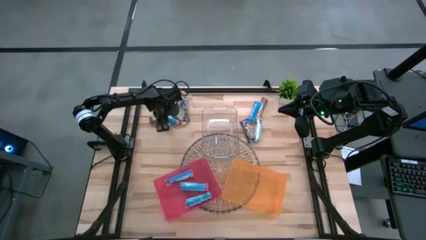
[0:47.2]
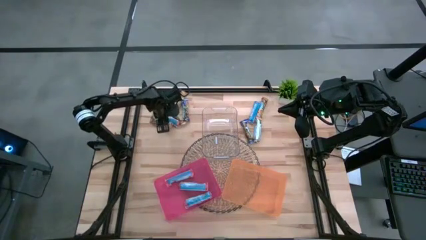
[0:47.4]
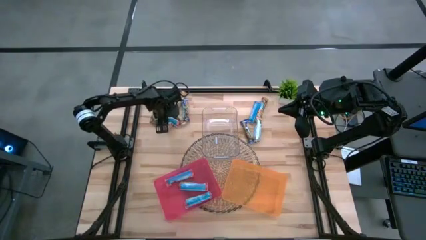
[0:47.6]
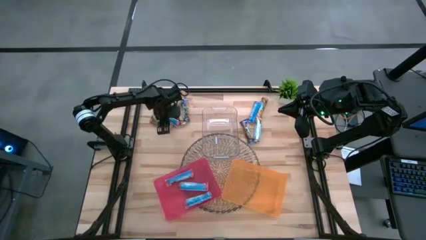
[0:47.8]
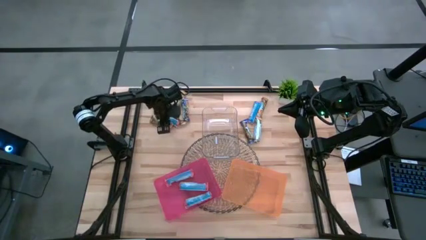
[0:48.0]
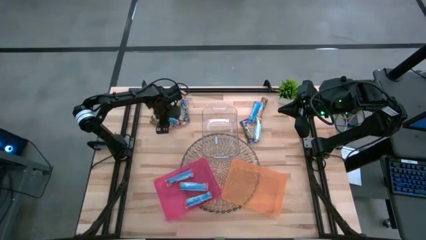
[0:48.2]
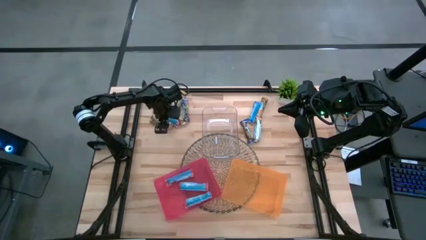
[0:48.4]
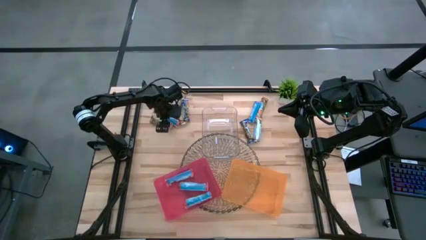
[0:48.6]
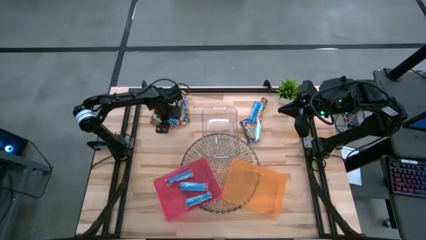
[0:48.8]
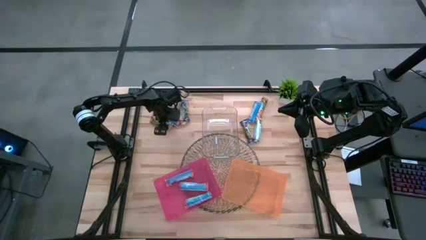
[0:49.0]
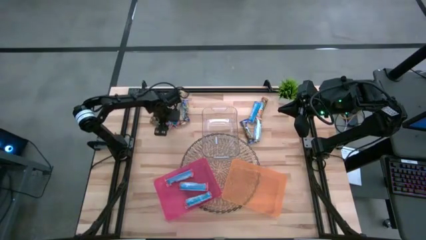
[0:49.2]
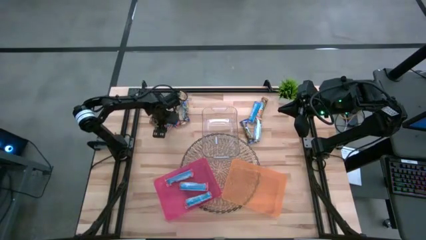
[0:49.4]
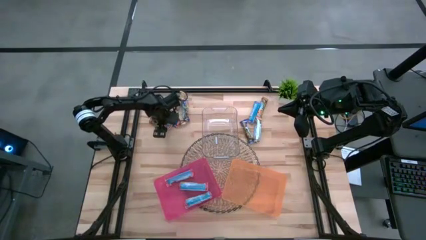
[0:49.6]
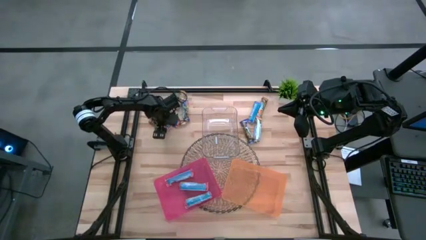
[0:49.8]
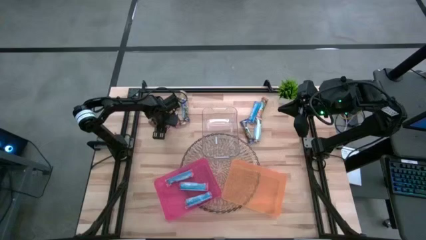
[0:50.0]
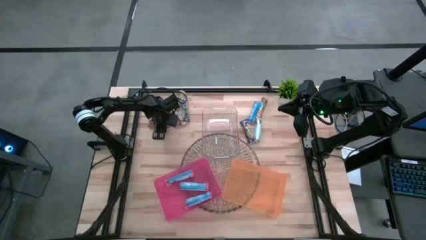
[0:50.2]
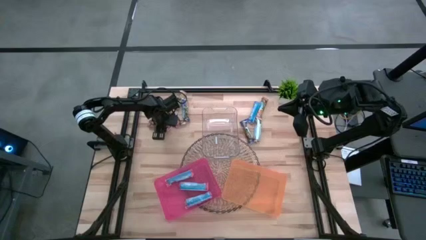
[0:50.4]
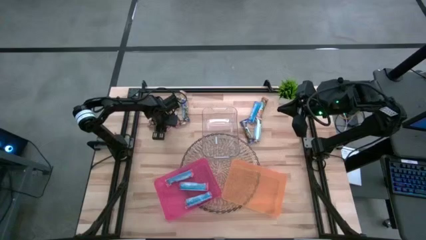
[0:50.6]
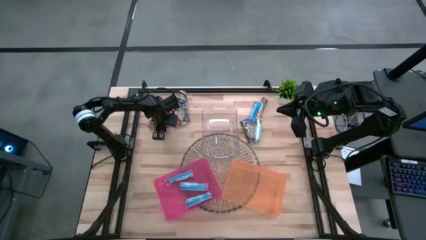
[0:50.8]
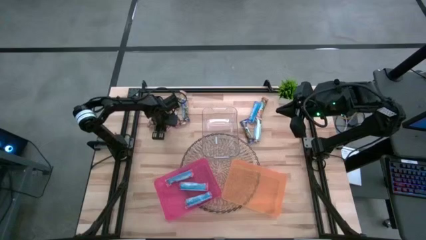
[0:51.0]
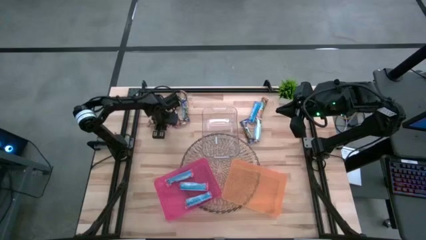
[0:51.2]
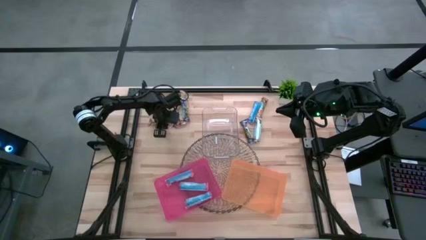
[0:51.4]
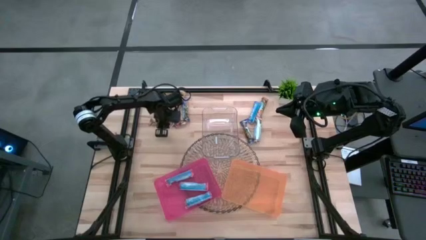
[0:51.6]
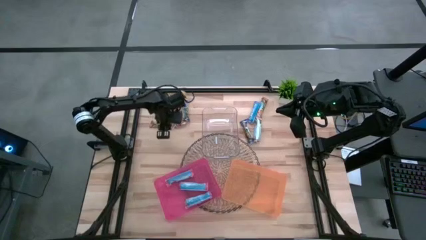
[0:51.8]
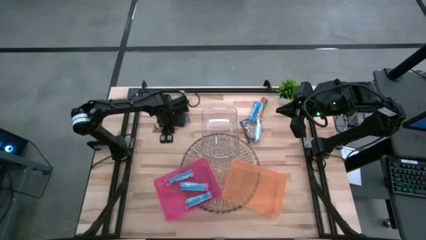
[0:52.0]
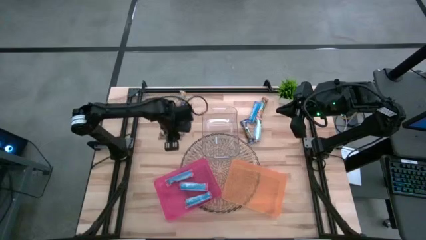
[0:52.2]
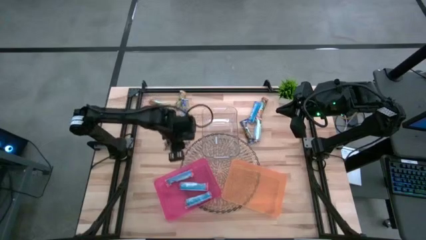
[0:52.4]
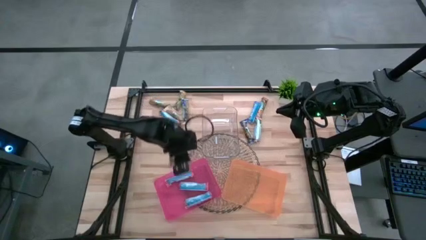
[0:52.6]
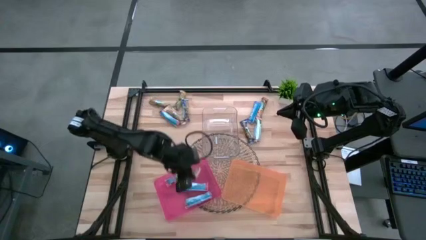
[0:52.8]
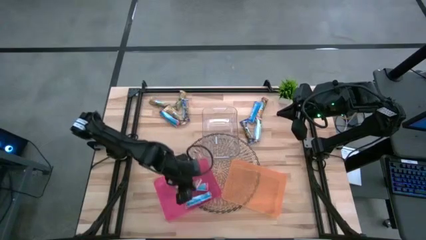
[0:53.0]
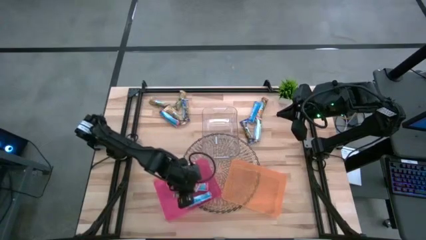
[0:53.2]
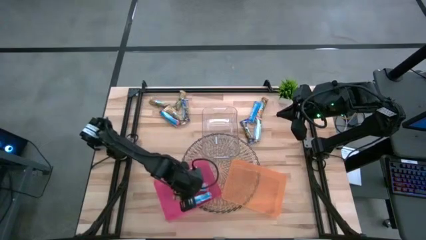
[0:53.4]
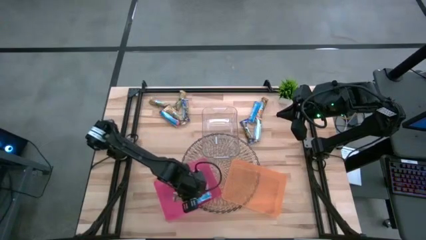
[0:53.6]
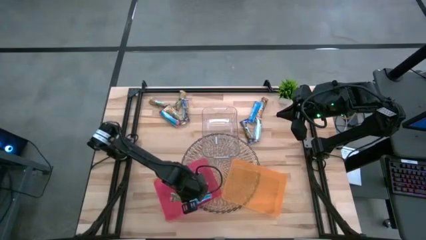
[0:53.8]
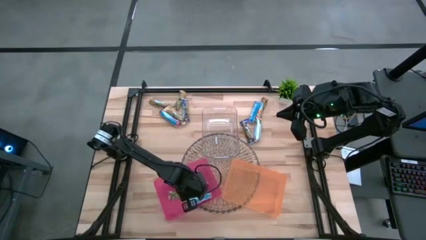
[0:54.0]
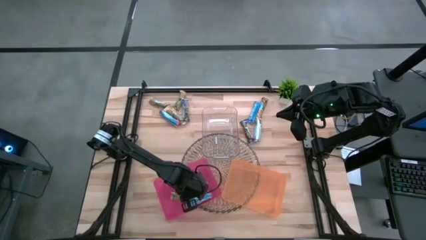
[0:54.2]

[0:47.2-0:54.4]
Task: Pick and place Granola Bars by type
Put the red granola bar into the red bin

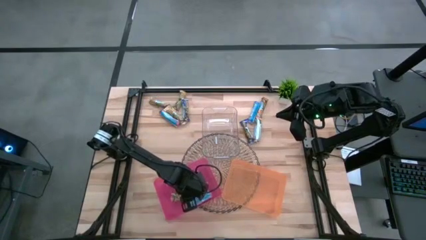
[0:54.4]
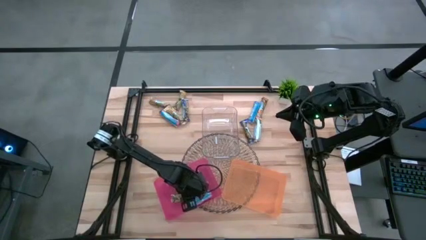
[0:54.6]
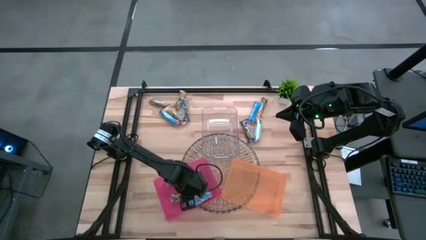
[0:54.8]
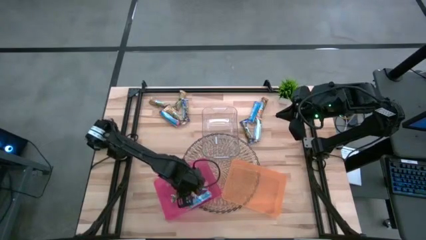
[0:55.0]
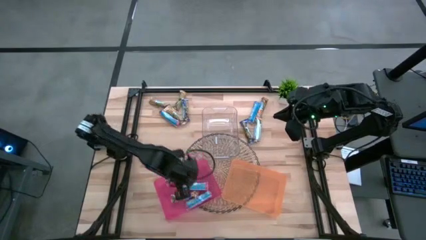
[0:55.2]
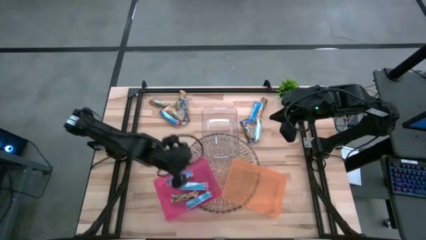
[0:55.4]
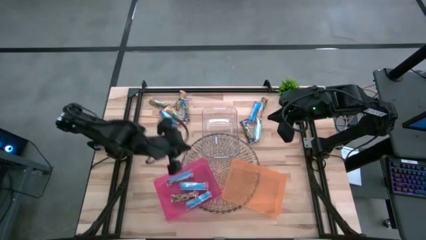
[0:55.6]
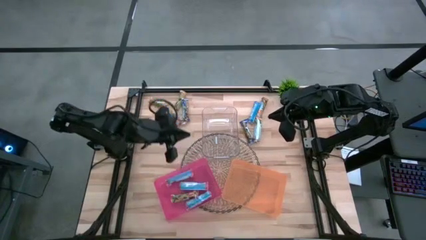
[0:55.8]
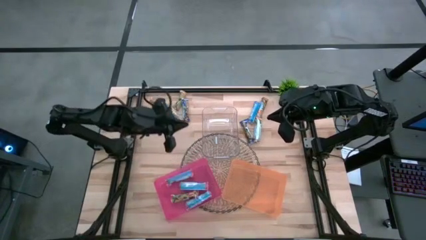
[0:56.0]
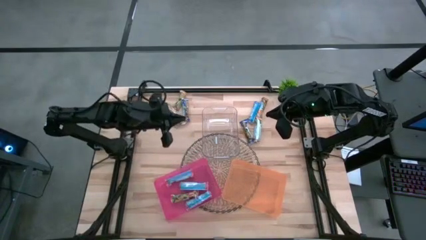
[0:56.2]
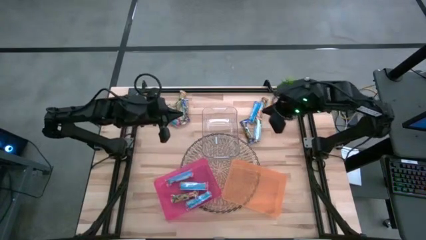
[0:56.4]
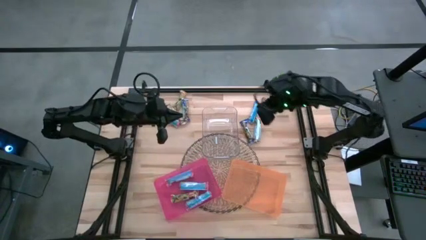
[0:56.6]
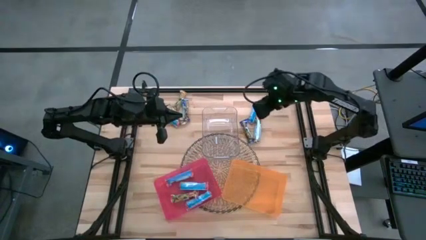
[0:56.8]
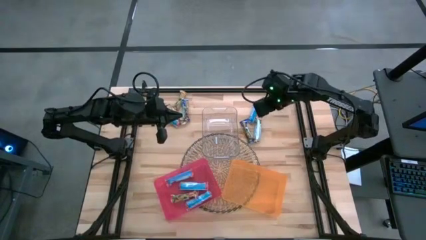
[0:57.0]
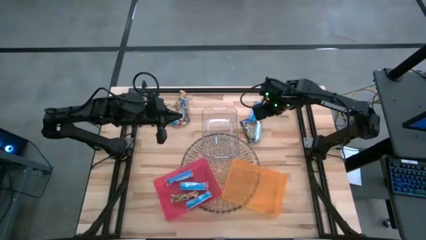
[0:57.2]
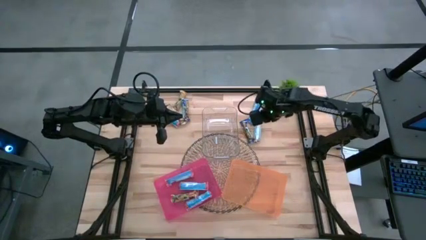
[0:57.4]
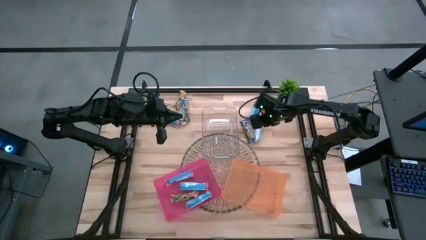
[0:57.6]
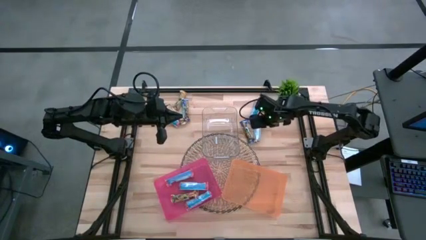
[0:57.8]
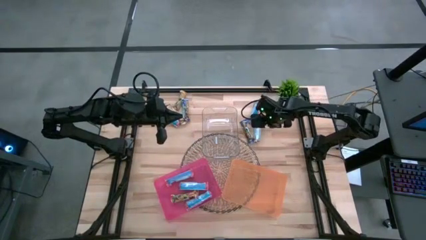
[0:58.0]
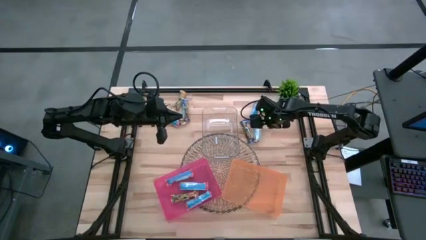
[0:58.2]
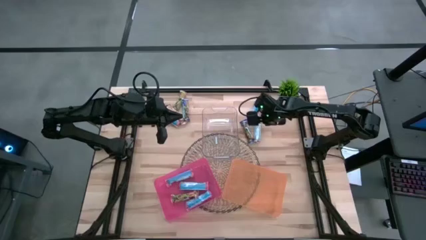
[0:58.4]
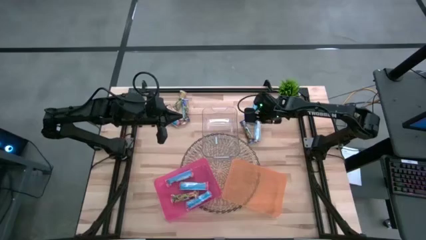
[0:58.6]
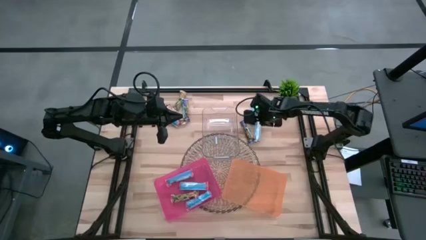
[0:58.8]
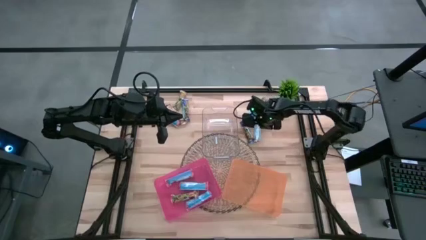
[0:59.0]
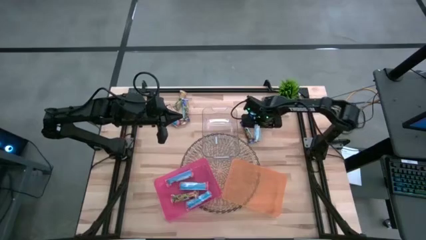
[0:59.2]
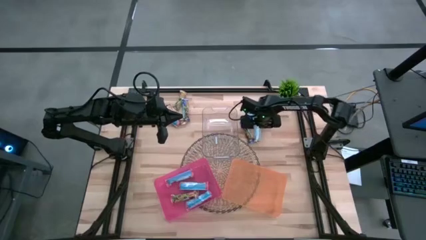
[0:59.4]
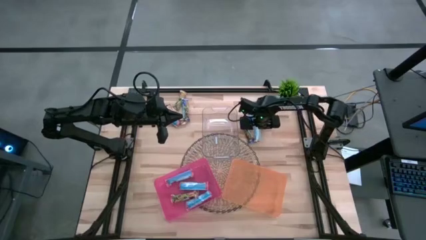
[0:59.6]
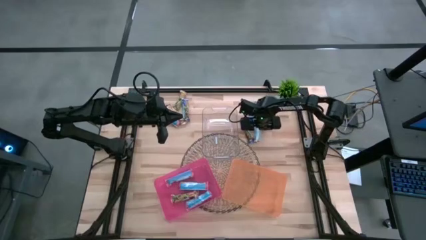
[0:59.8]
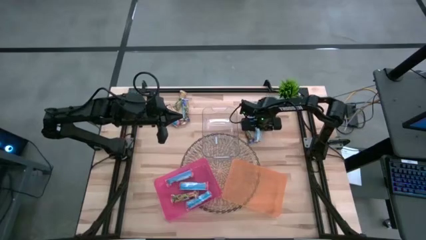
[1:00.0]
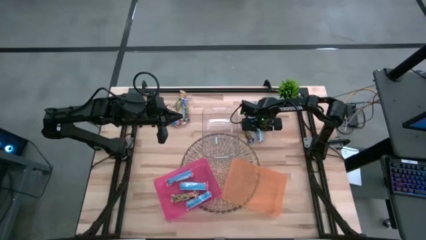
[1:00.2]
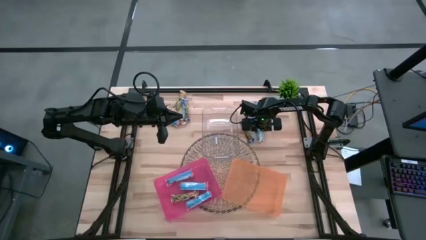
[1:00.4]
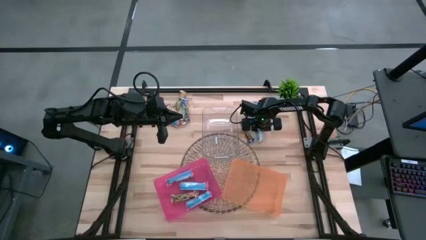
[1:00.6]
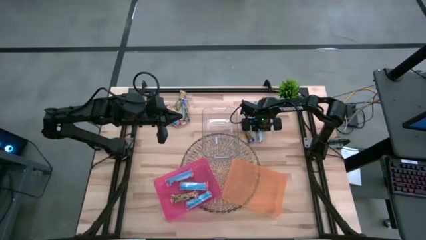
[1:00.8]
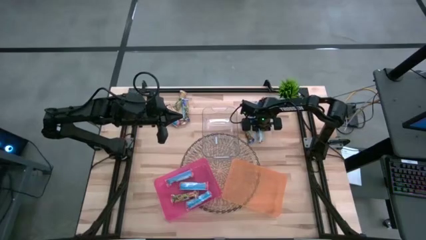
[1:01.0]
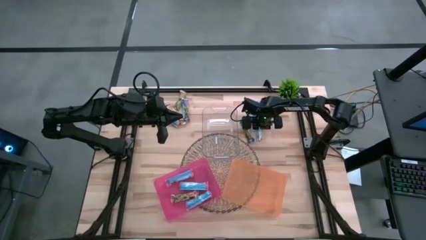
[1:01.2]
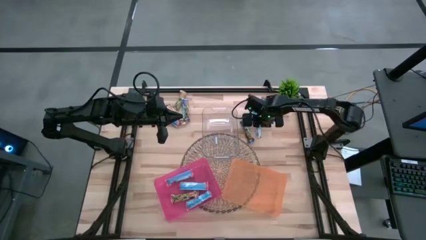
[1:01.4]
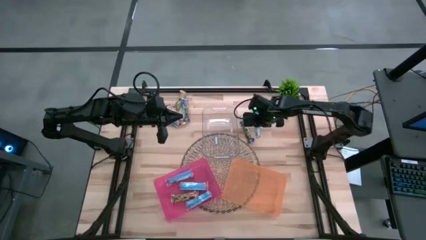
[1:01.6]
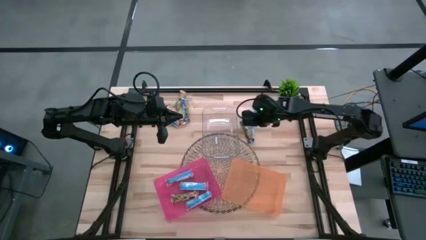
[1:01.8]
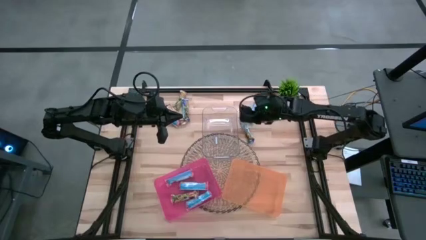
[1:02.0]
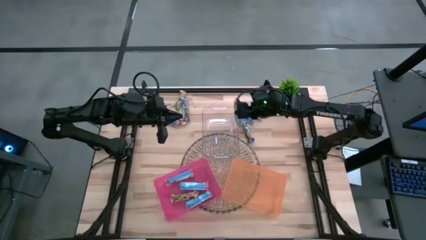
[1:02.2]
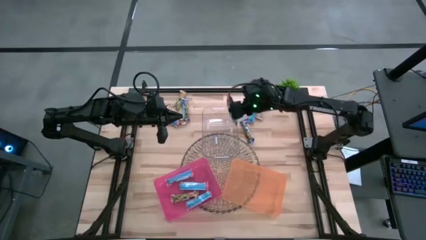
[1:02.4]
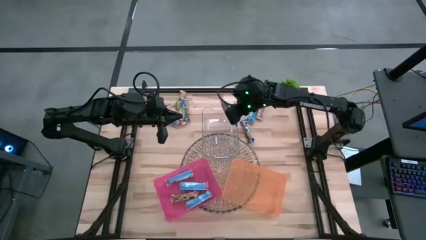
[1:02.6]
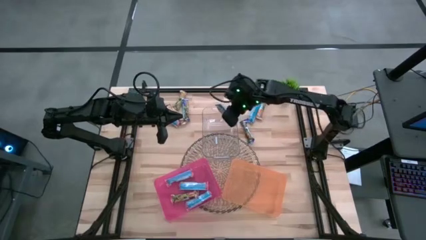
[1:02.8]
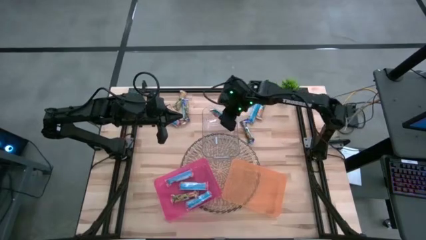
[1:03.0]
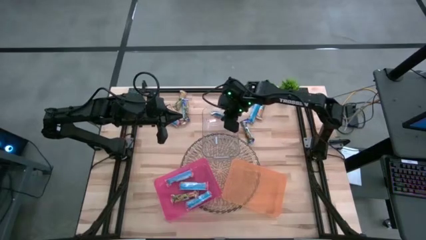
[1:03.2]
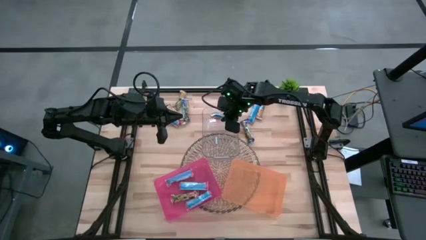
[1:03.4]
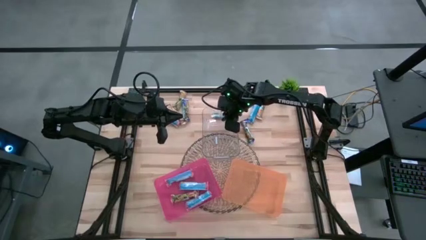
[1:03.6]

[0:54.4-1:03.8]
Put the orange granola bar into the transparent bin
